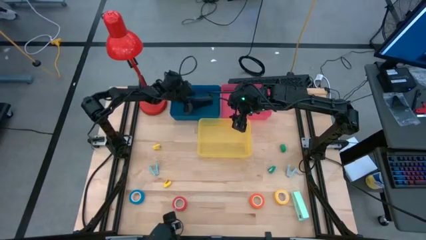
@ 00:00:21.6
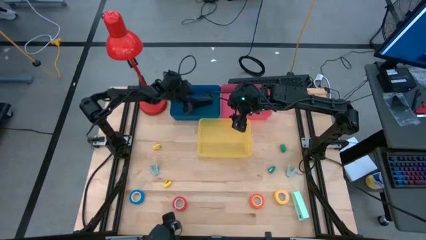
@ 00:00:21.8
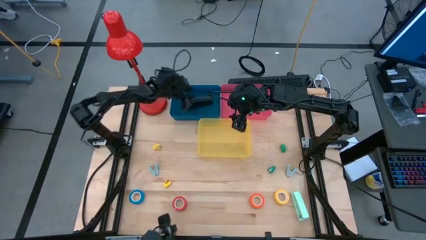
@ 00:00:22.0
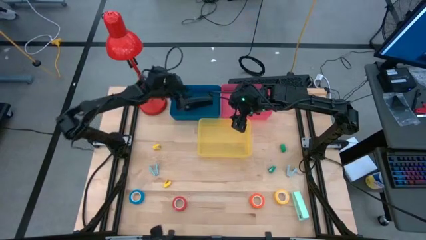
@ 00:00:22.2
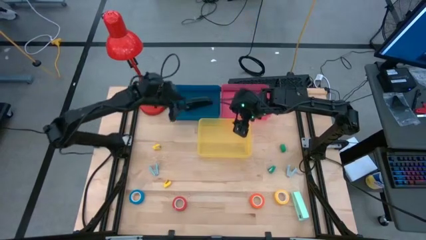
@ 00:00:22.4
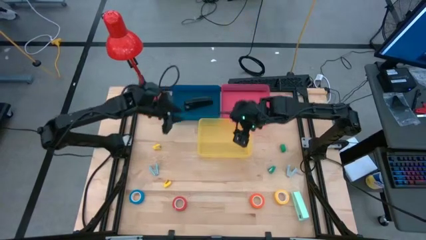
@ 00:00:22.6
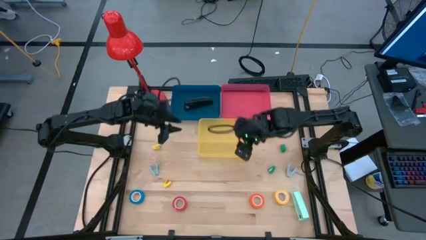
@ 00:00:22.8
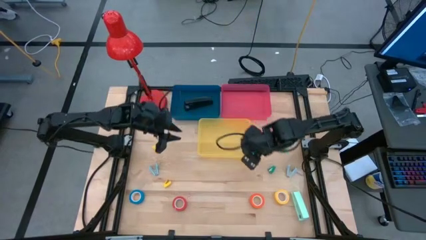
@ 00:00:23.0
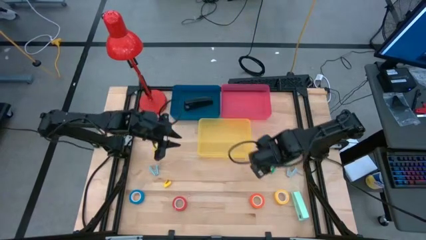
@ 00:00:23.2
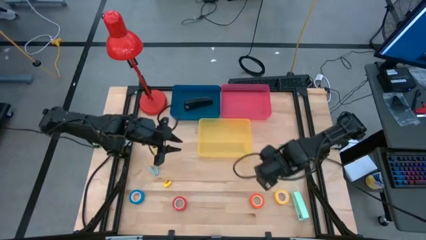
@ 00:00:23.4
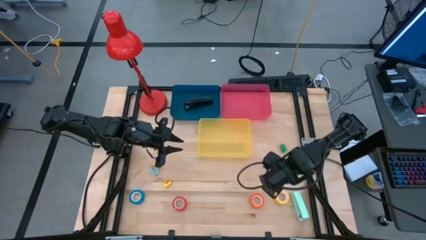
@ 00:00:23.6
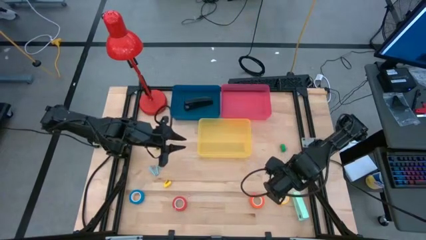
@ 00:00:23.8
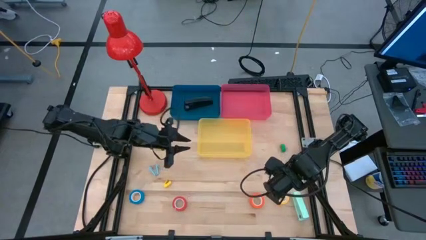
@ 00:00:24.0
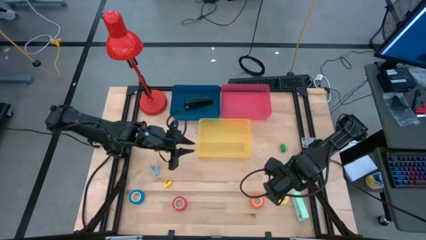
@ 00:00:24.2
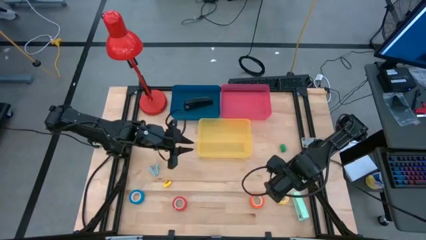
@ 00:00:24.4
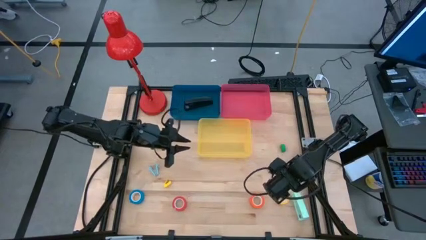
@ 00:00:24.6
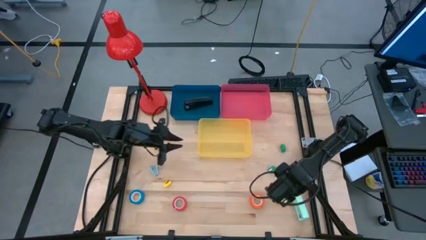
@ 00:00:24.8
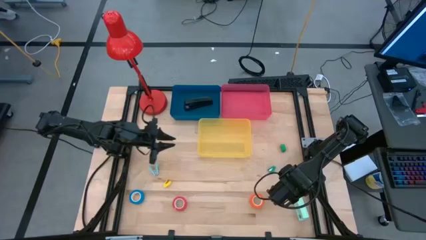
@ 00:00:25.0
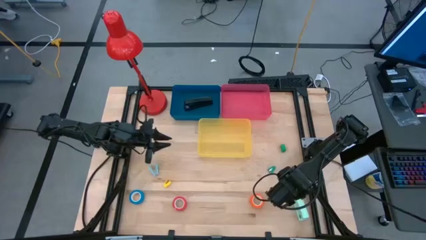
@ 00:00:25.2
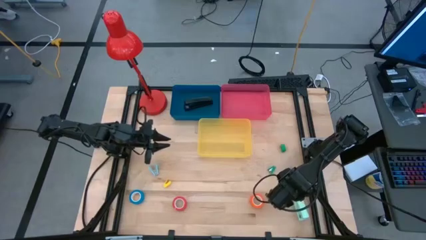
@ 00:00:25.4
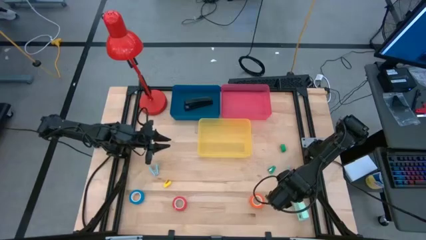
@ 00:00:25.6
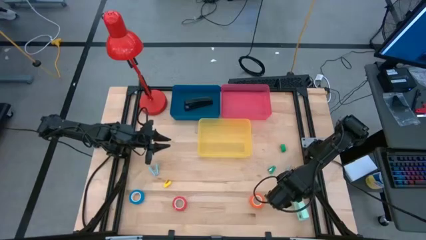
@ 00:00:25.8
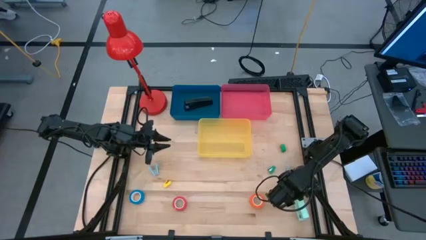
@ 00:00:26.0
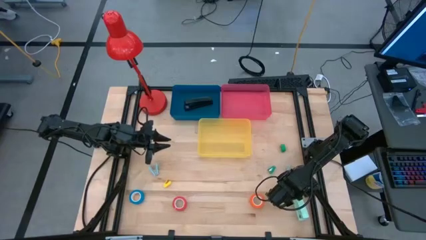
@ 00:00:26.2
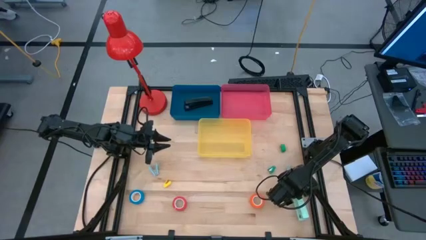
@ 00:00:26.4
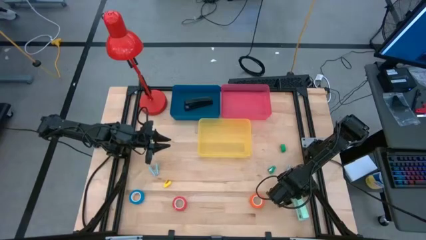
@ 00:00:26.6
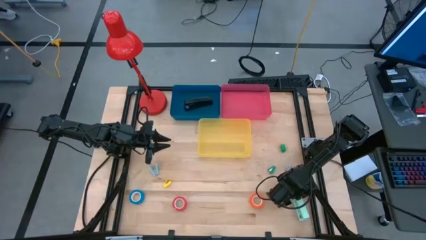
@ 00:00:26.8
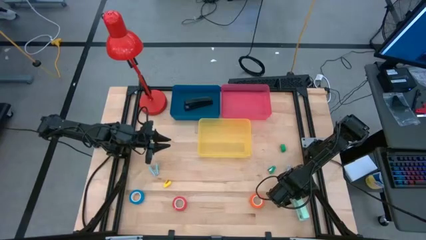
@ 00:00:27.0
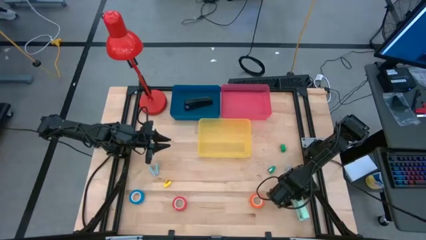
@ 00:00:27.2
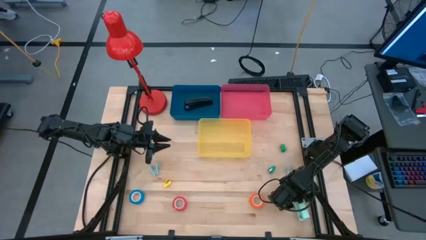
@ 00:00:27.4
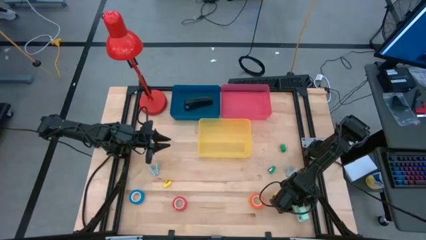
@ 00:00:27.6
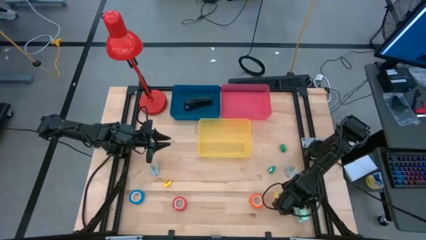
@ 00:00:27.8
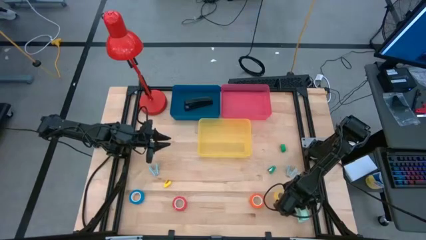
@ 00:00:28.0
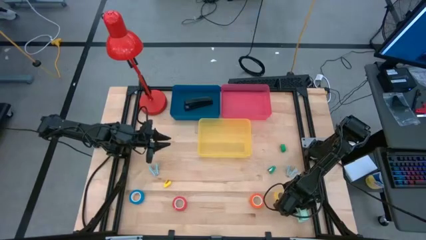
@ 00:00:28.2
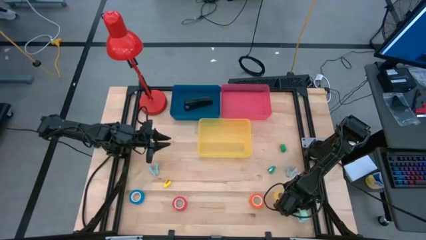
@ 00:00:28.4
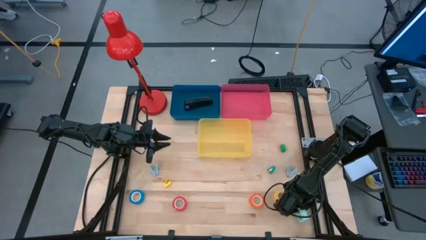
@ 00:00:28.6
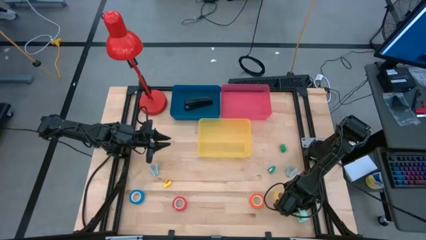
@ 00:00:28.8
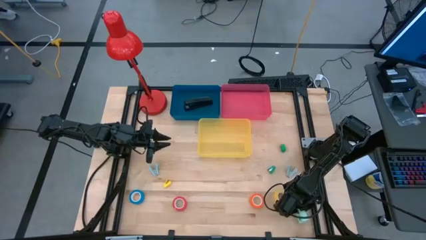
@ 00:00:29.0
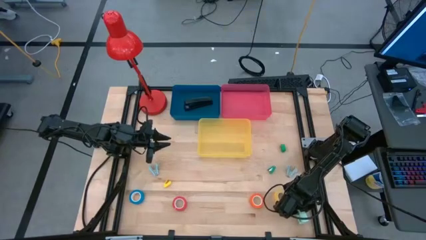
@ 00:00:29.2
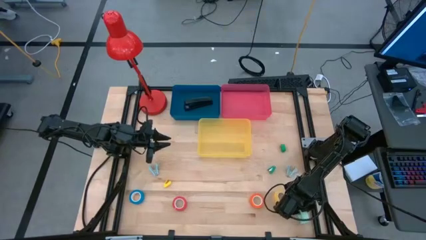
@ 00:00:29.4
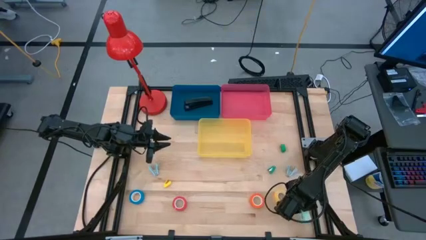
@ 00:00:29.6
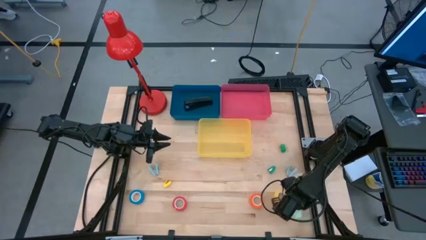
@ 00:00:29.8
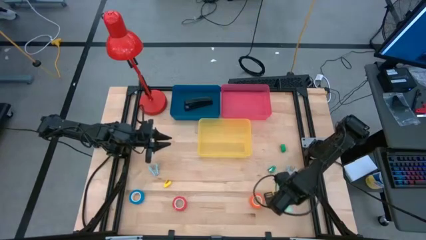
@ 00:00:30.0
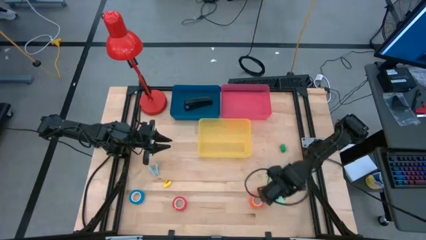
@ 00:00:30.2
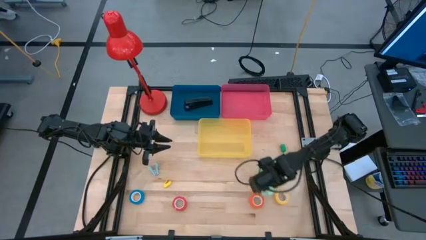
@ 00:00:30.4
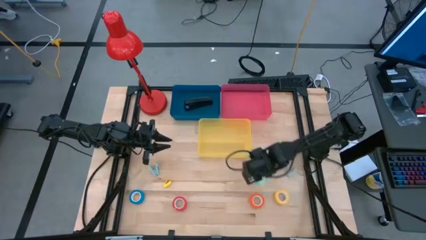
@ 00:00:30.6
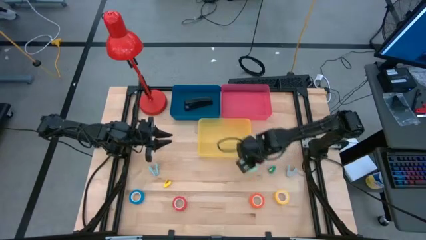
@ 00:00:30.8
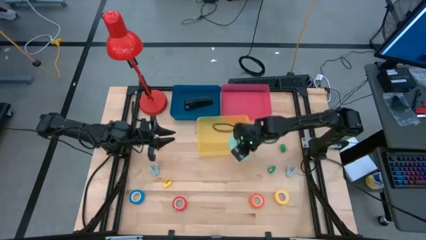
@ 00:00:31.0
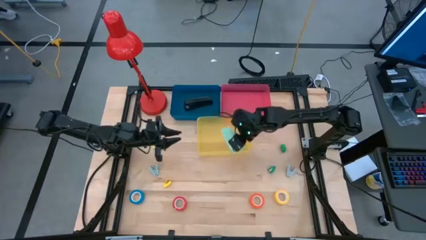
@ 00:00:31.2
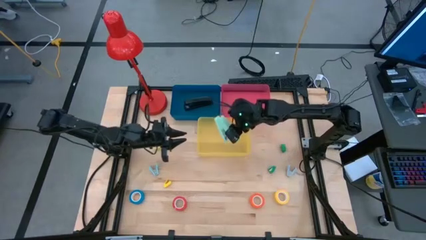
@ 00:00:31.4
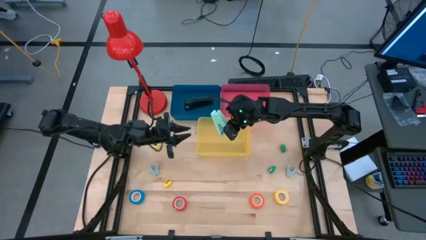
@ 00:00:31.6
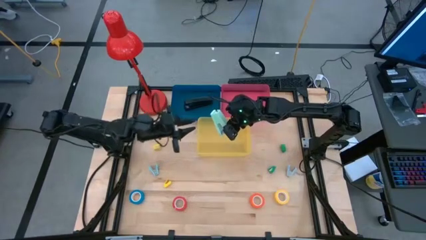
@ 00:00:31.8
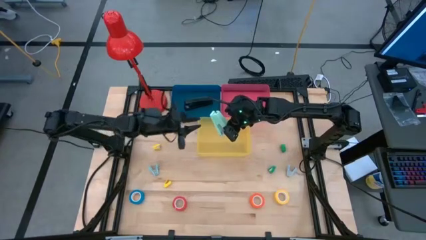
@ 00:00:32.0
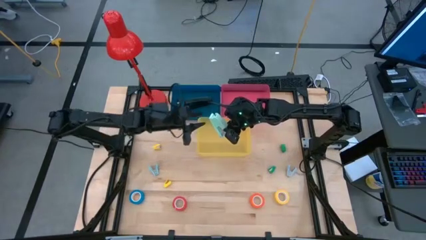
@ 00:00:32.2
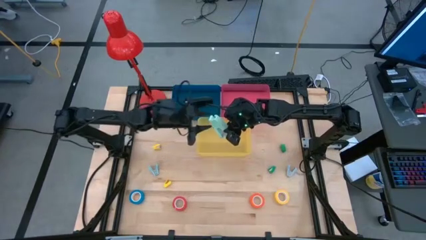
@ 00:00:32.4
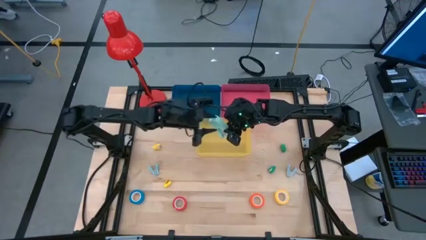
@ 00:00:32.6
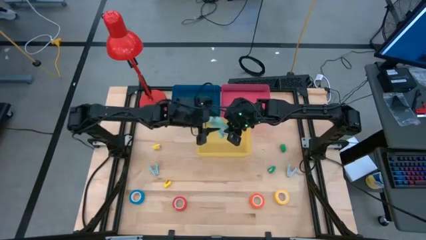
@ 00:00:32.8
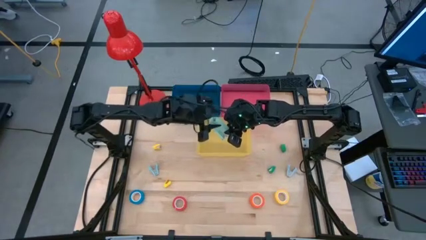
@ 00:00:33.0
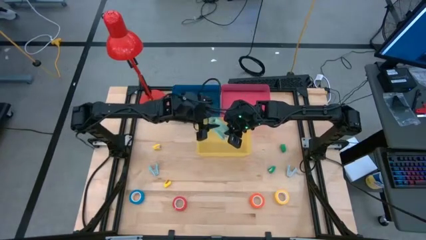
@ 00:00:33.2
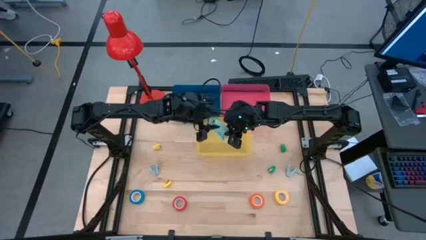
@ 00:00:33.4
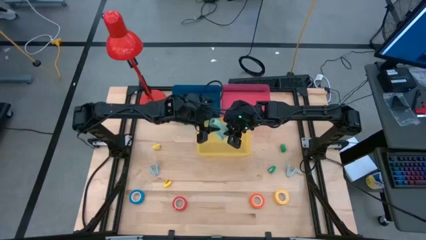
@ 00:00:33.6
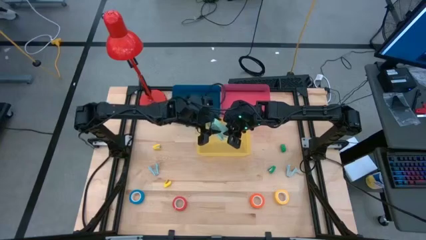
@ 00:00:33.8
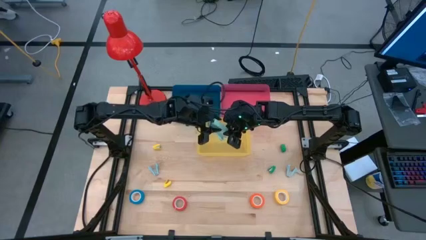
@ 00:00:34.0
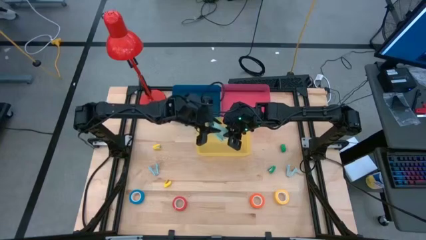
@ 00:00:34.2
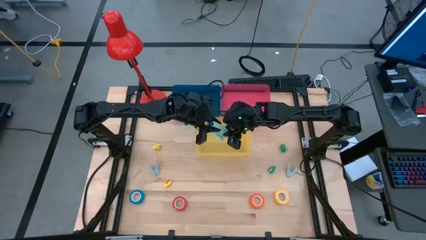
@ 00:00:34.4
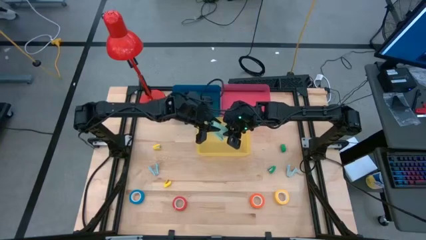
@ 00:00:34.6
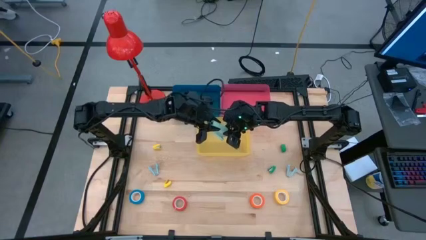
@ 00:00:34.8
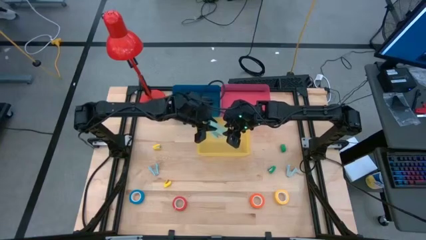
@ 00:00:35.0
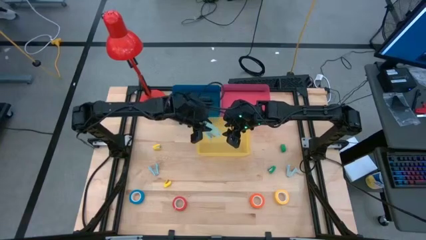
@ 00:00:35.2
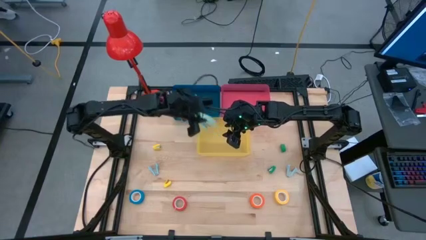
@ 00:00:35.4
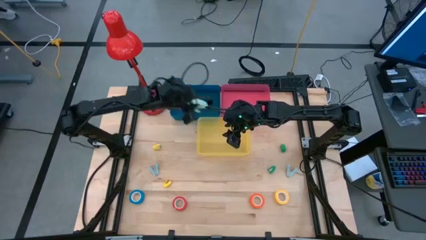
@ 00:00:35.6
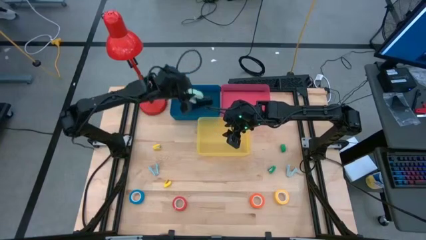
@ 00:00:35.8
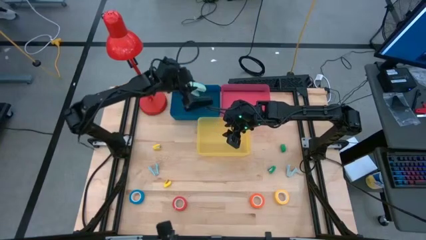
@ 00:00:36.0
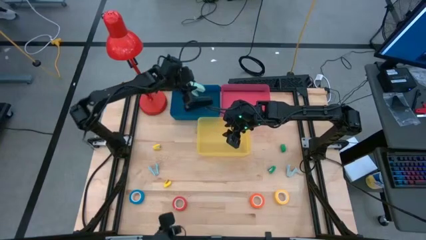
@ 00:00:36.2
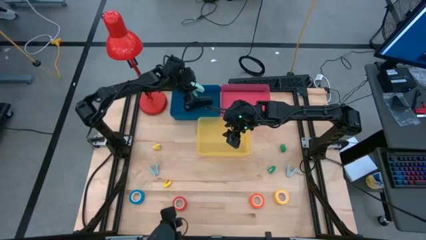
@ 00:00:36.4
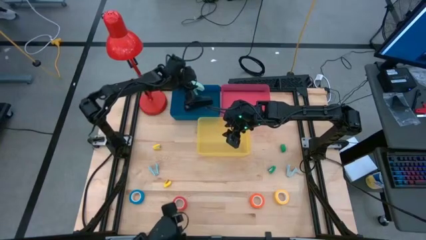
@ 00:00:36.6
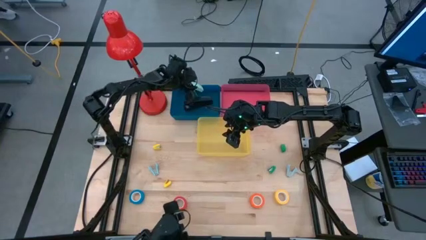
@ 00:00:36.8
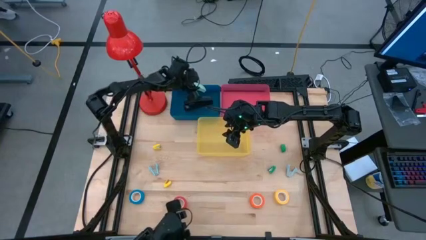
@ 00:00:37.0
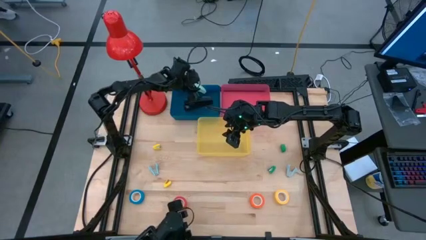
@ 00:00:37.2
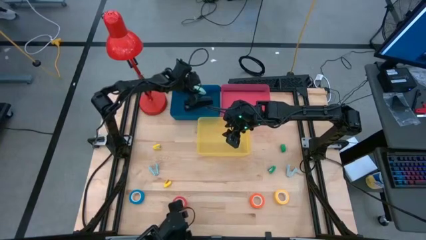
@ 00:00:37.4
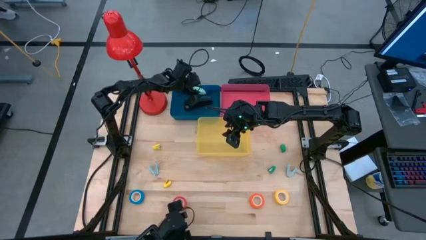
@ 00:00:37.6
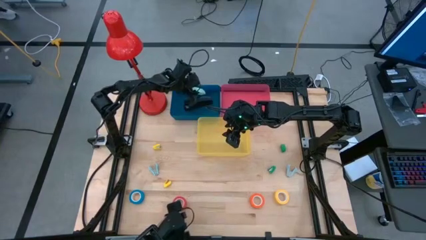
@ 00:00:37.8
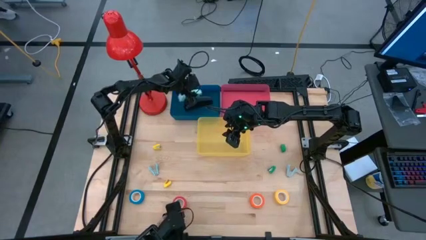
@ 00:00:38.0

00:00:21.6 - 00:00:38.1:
Task: Pick and place Stapler, Stapler remover, tape
Put the light blue stapler into the blue bin
